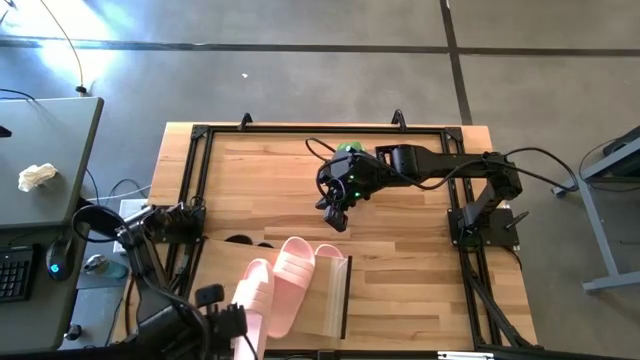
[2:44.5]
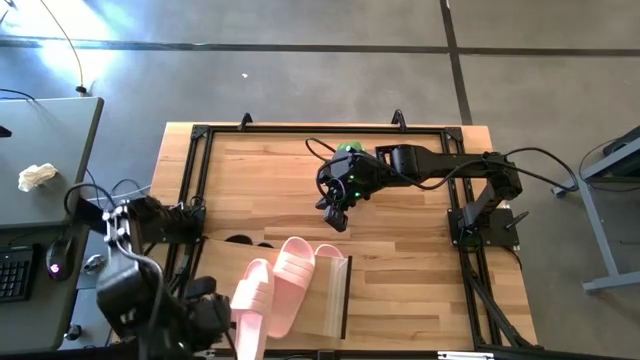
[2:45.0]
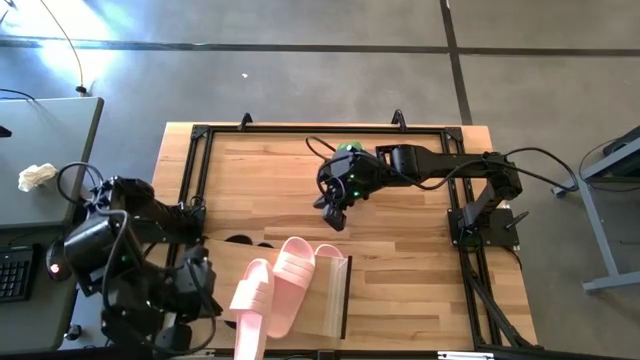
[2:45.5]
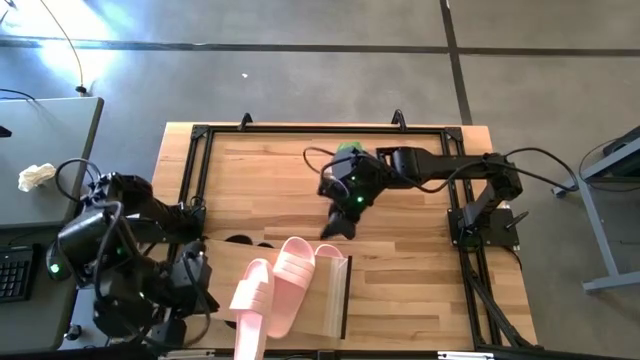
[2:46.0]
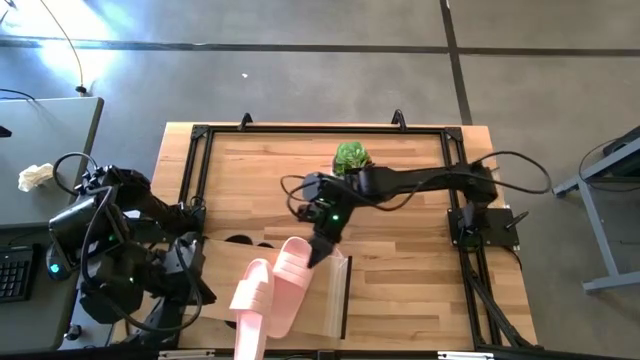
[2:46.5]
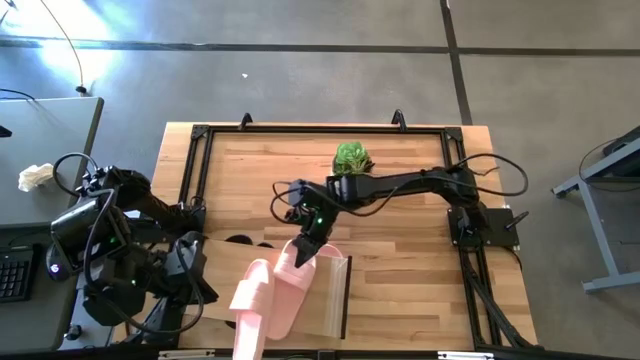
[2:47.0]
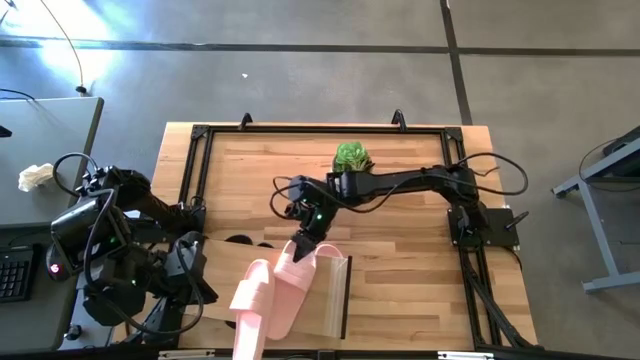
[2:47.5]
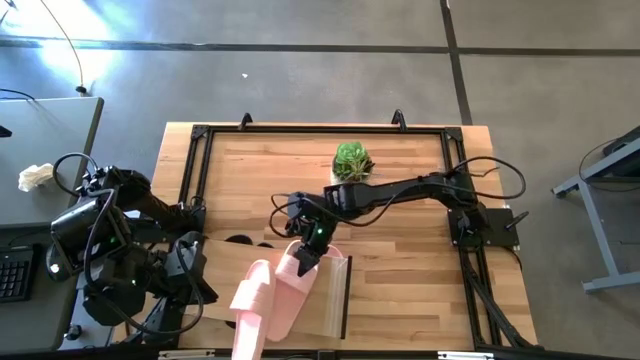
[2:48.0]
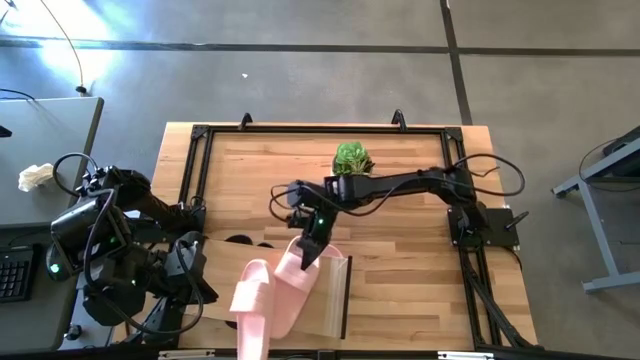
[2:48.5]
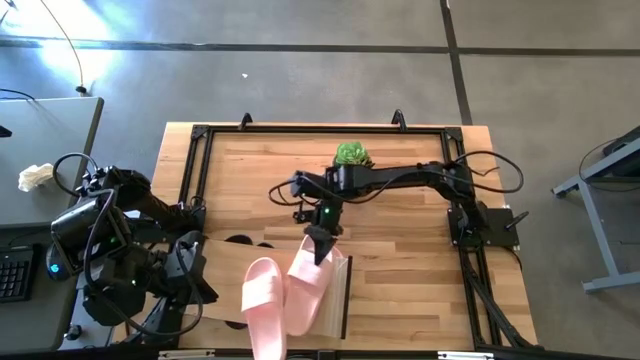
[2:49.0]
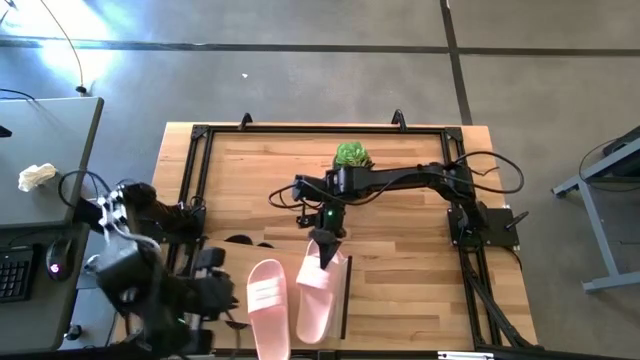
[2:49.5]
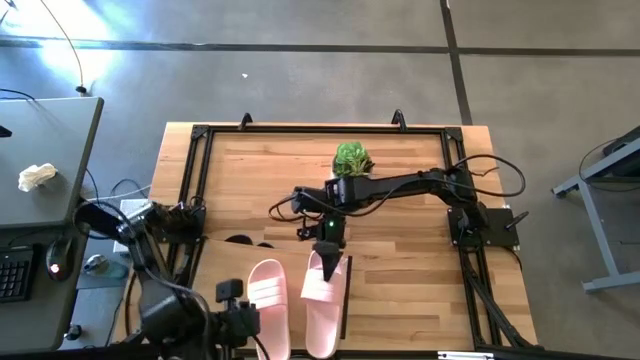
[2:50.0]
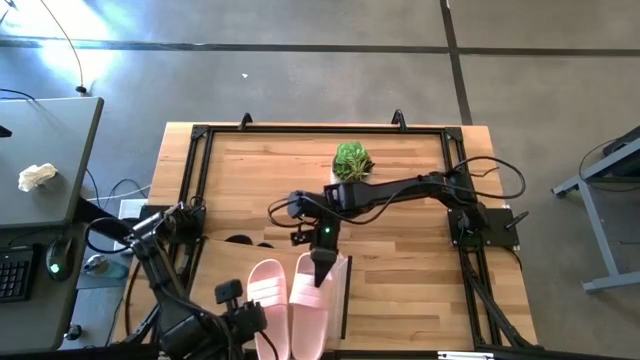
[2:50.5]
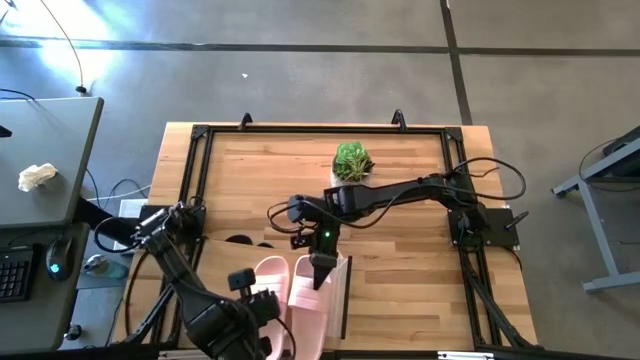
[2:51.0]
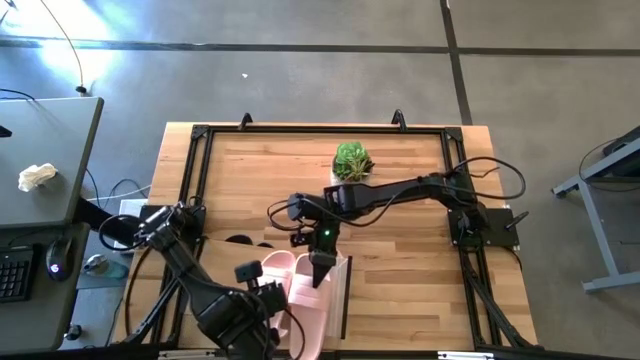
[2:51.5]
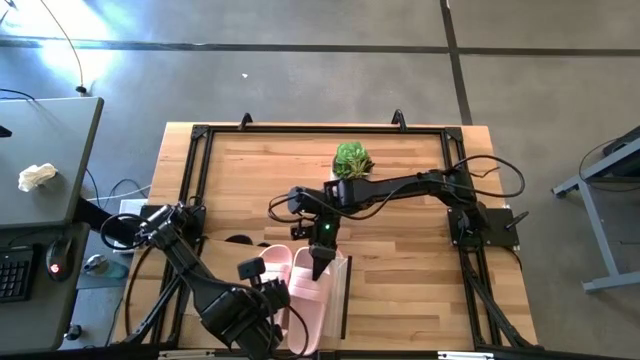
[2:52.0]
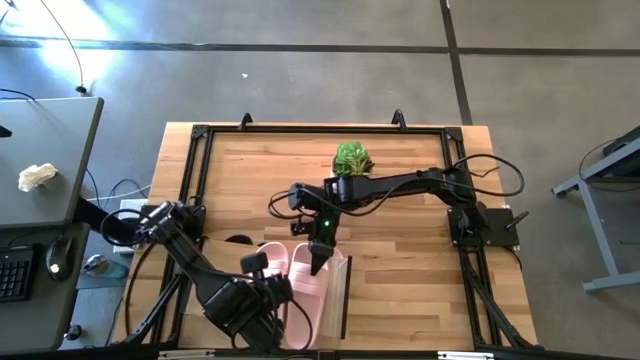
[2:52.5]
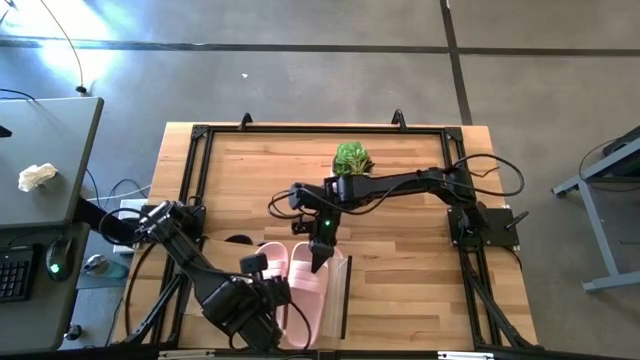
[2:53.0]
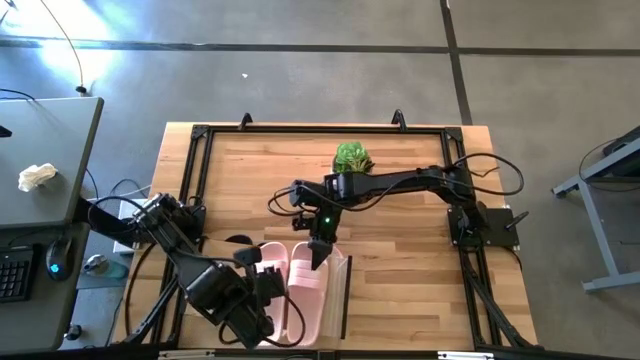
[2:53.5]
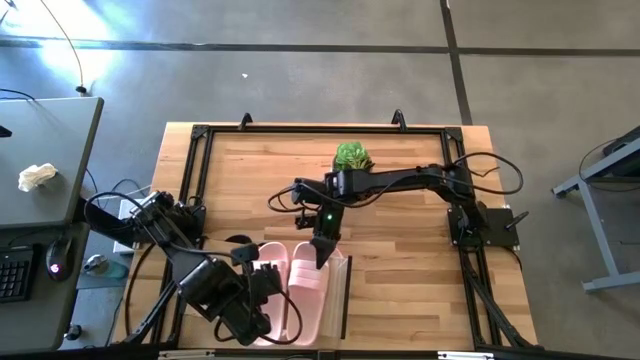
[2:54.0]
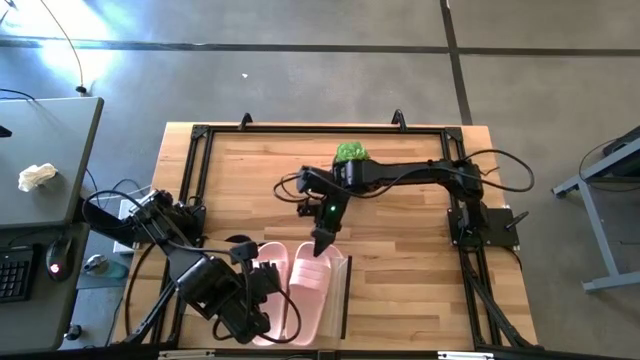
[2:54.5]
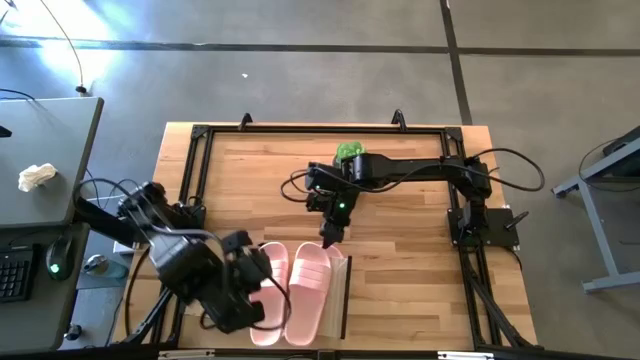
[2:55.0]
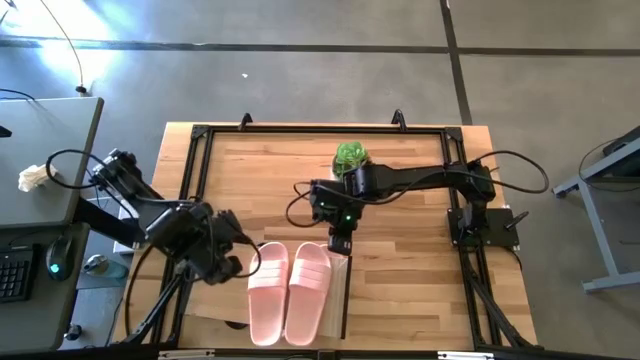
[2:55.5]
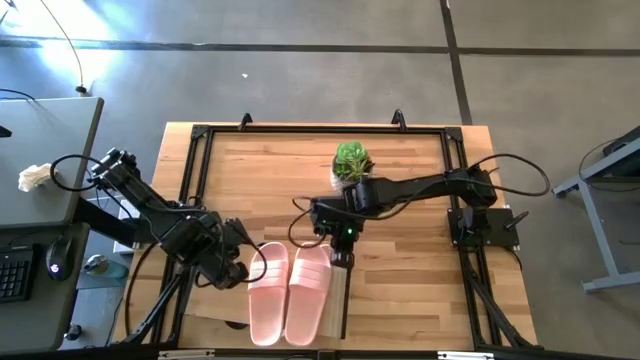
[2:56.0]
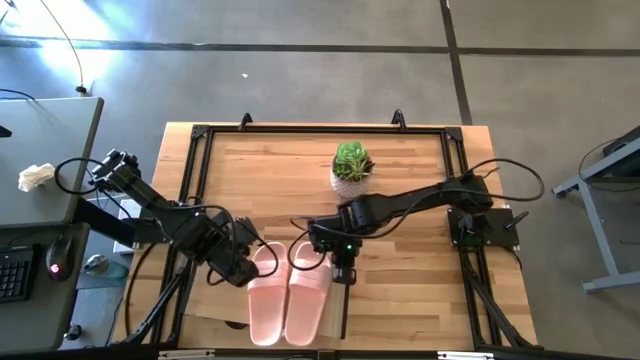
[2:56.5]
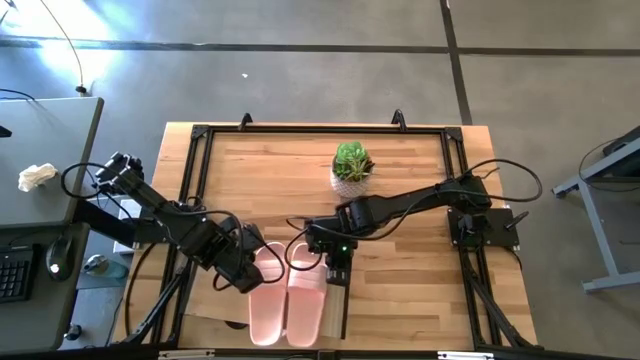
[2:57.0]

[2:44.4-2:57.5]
Task: Pick and place slides into the shelf
Adjust the pink slides on the shelf

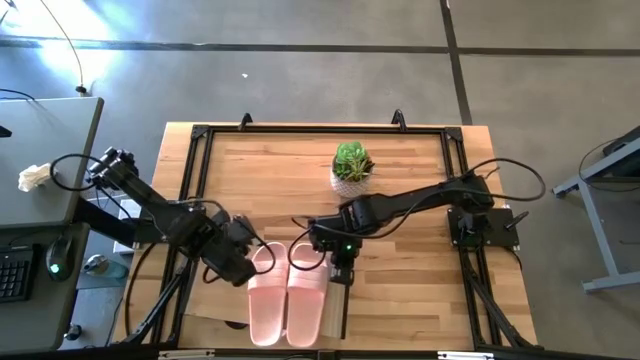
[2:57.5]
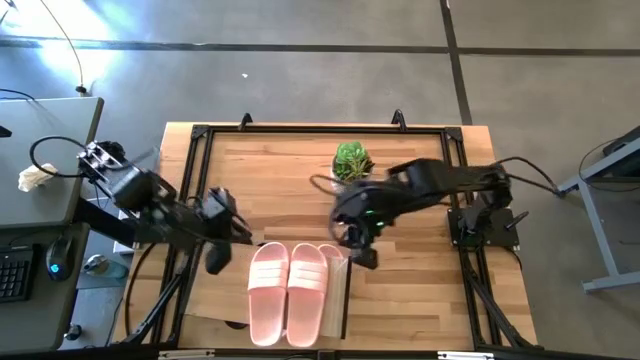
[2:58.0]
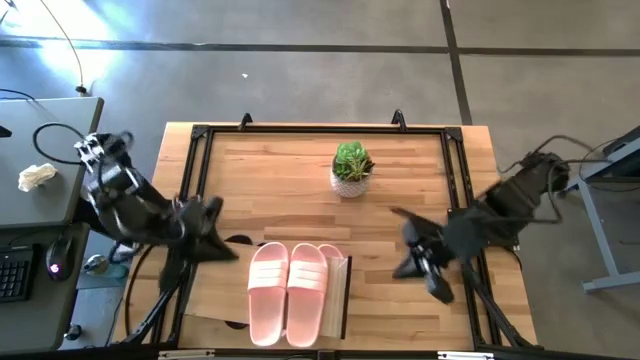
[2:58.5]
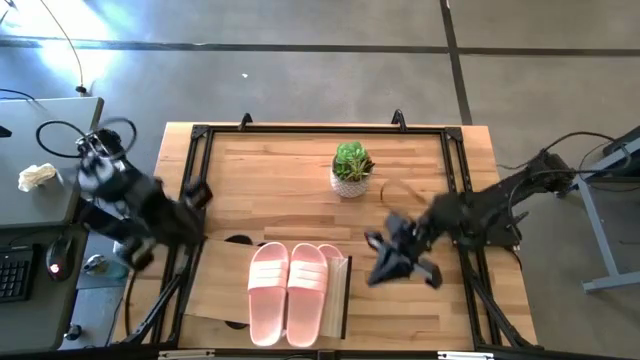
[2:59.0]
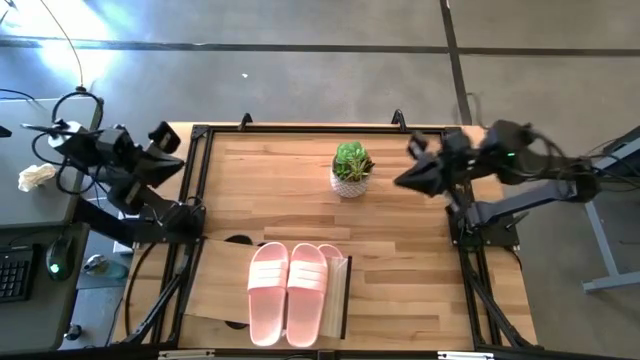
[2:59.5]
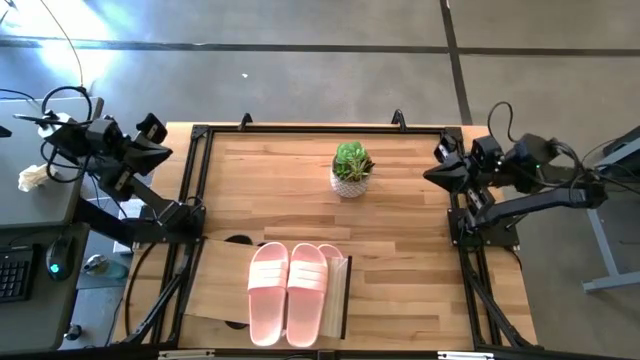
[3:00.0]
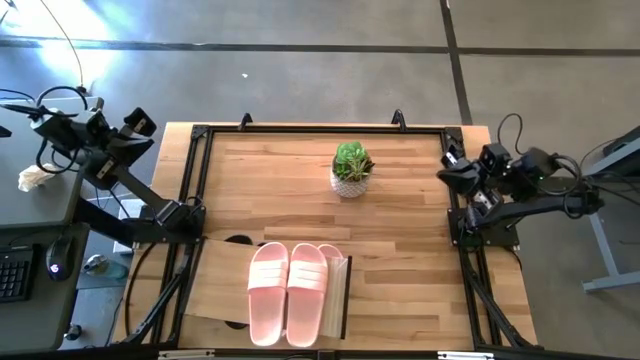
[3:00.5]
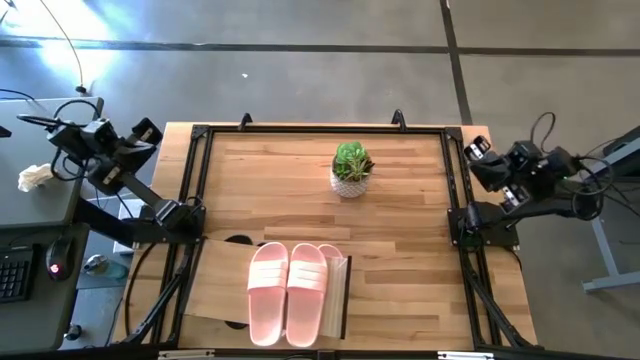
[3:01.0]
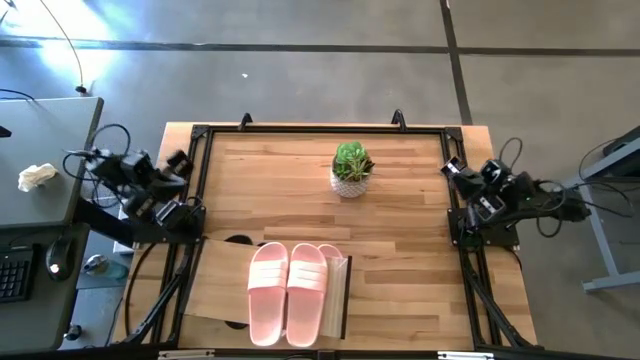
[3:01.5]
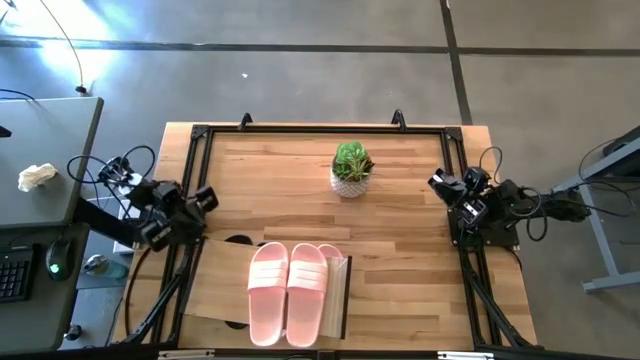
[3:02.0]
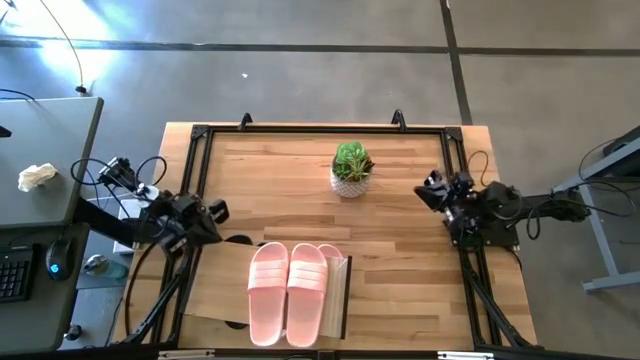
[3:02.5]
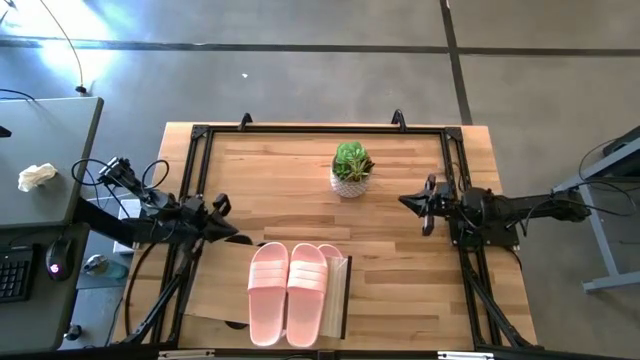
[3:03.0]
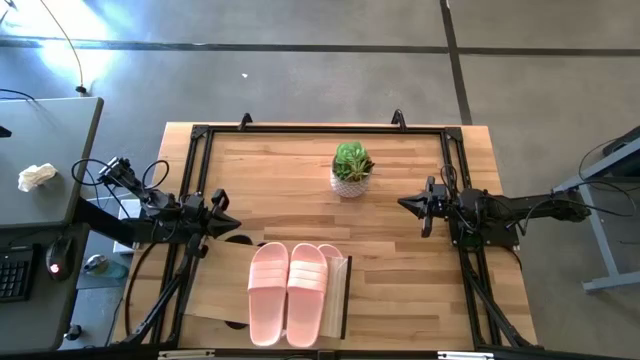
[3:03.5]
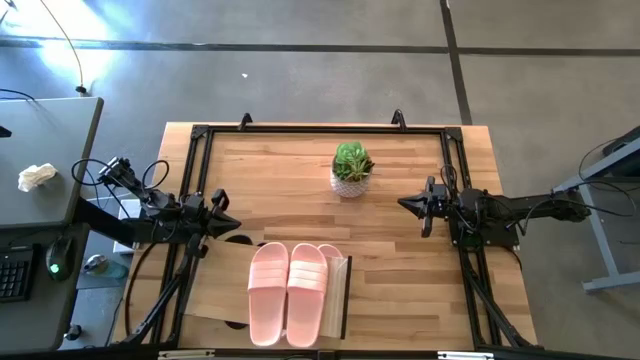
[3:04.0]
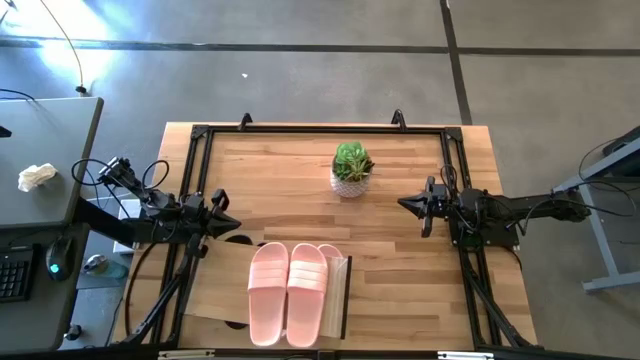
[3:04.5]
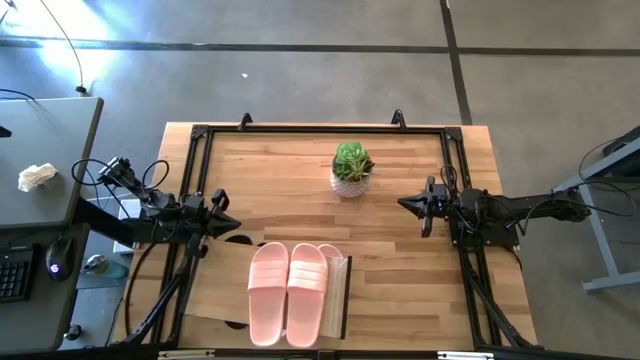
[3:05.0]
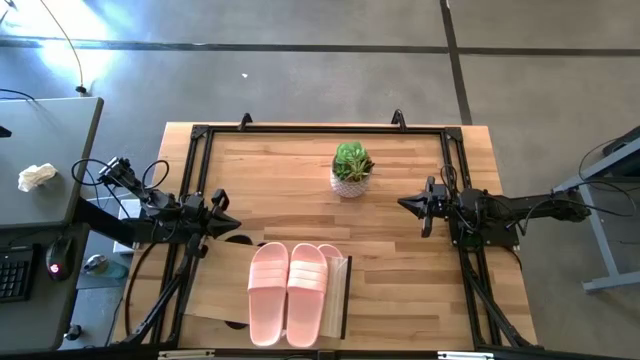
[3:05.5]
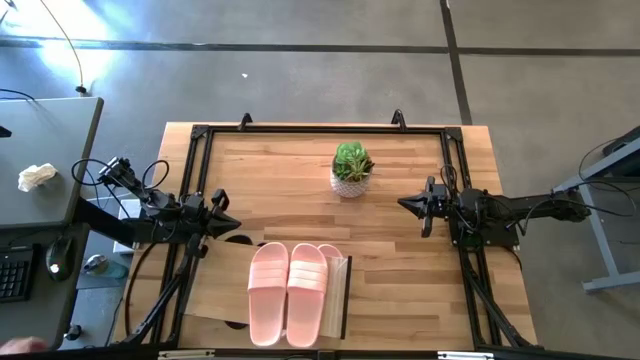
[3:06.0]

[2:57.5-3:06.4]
Return to Home Position
